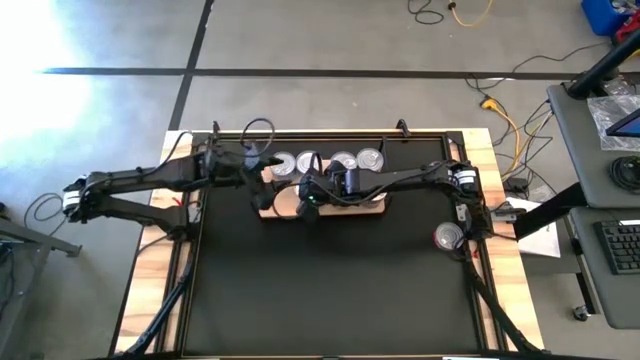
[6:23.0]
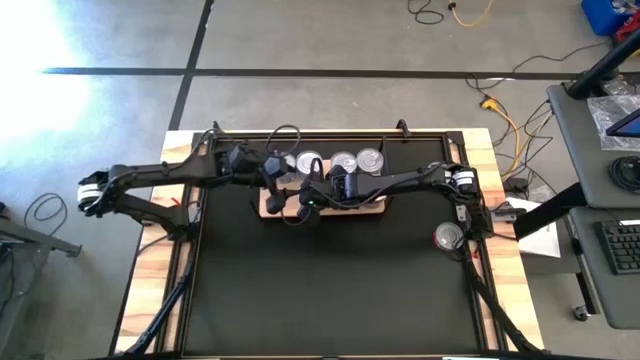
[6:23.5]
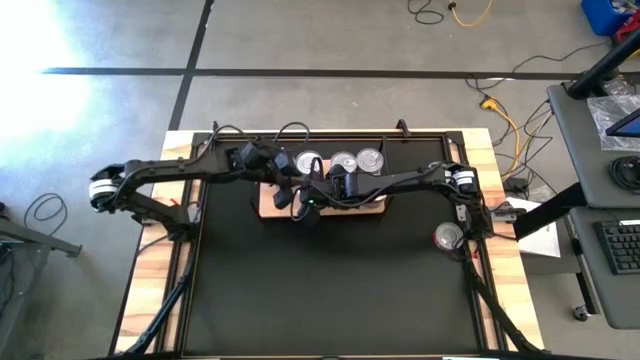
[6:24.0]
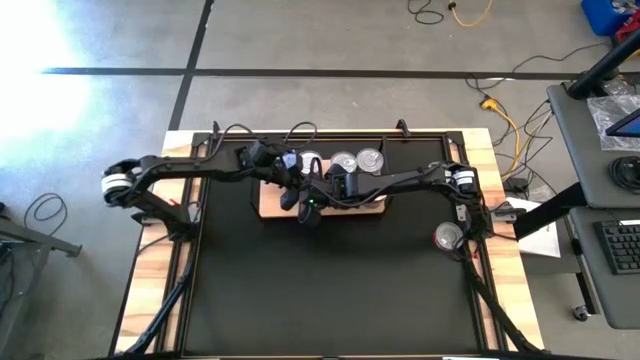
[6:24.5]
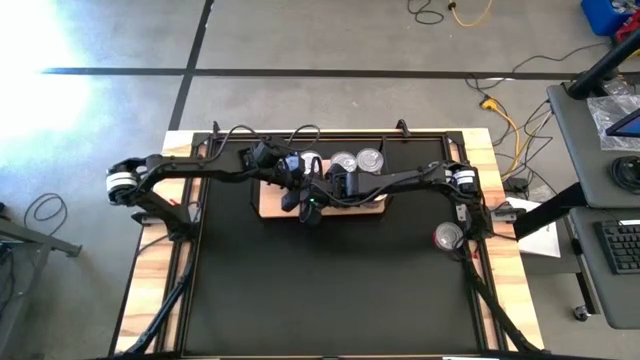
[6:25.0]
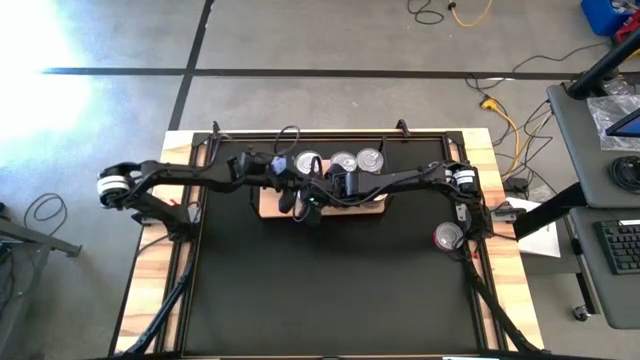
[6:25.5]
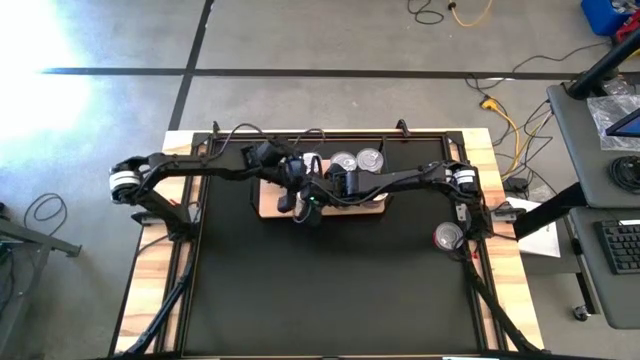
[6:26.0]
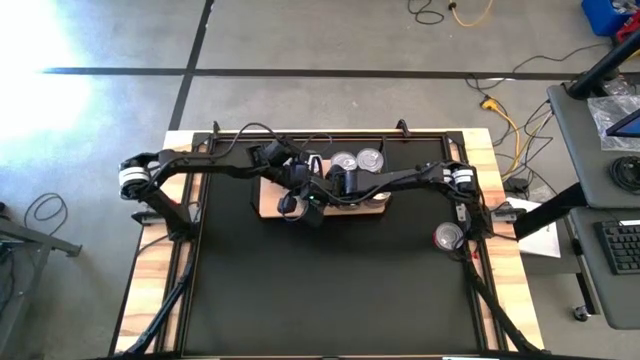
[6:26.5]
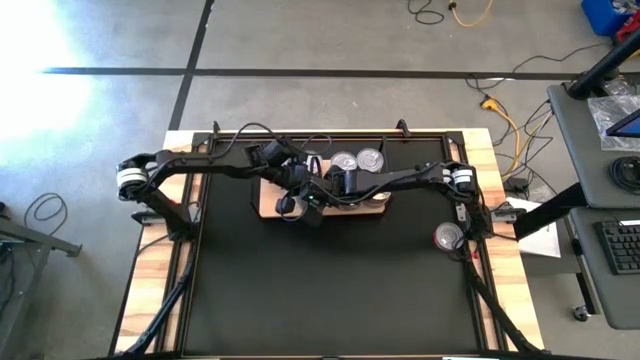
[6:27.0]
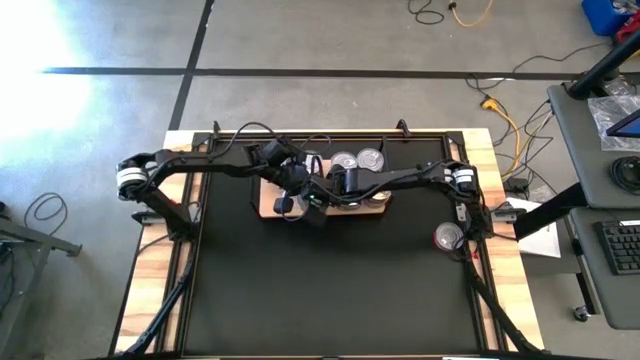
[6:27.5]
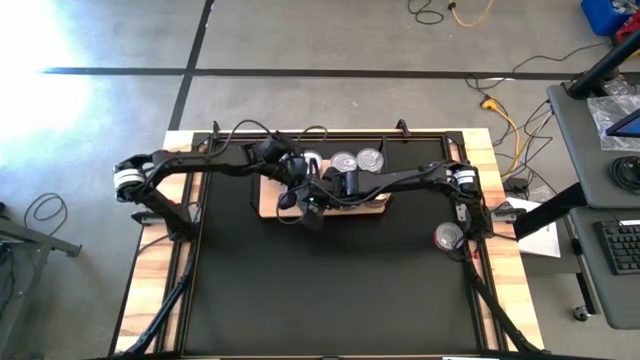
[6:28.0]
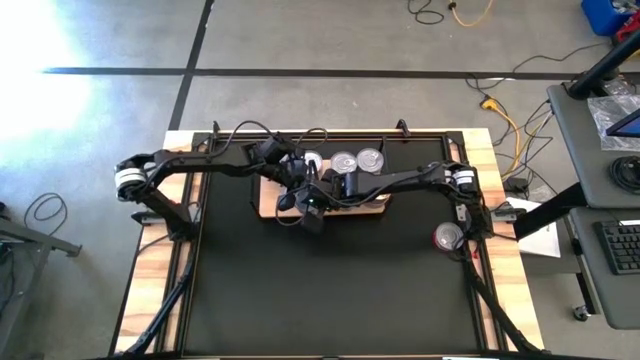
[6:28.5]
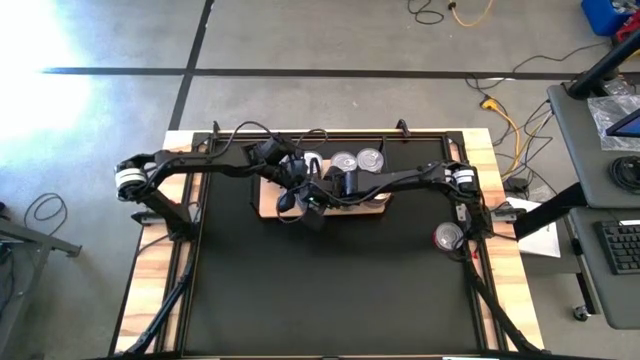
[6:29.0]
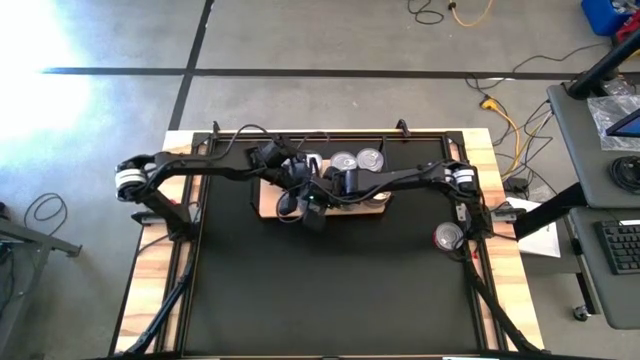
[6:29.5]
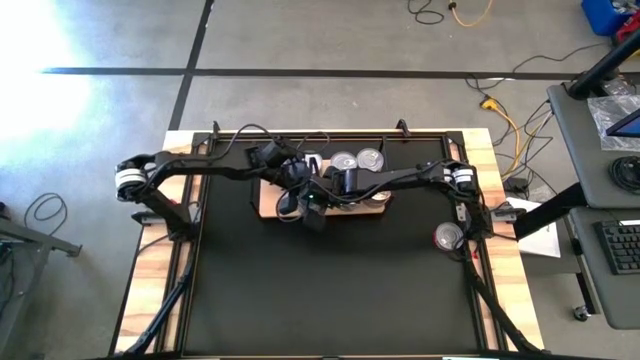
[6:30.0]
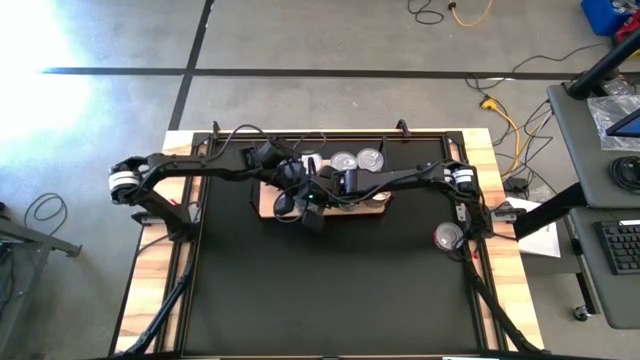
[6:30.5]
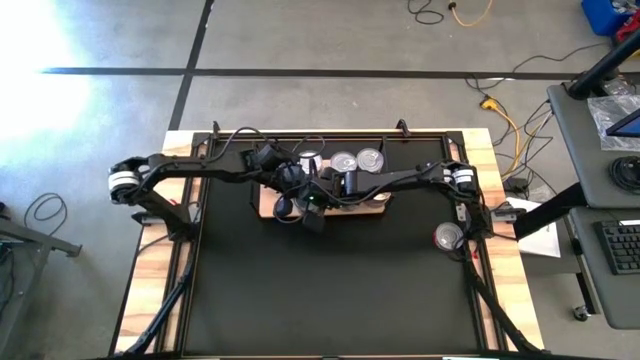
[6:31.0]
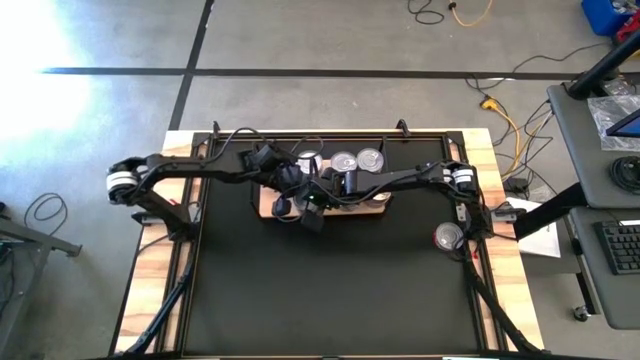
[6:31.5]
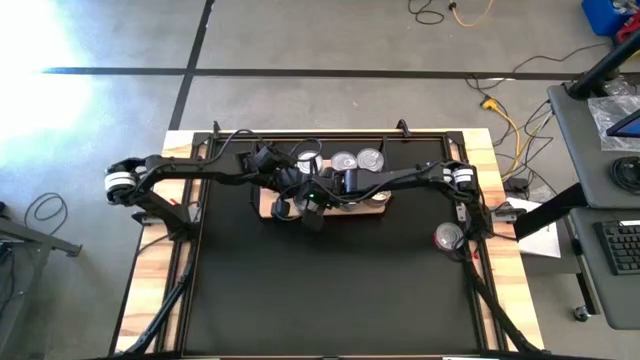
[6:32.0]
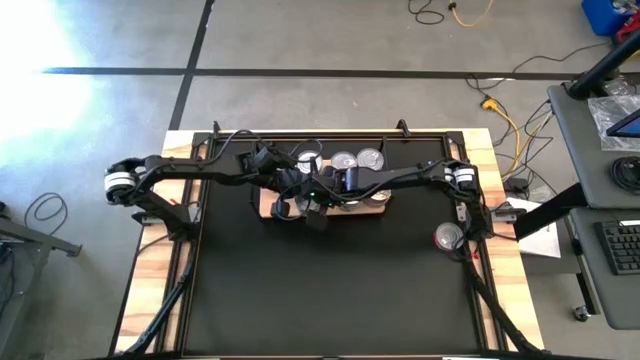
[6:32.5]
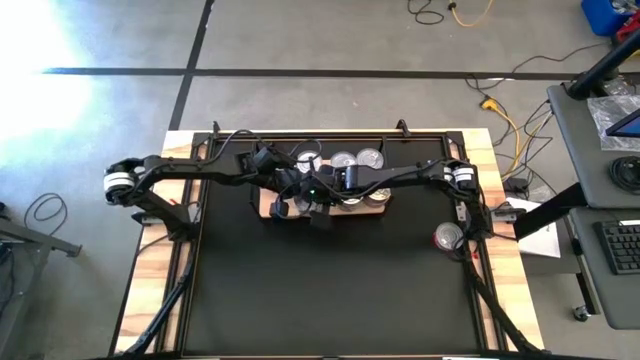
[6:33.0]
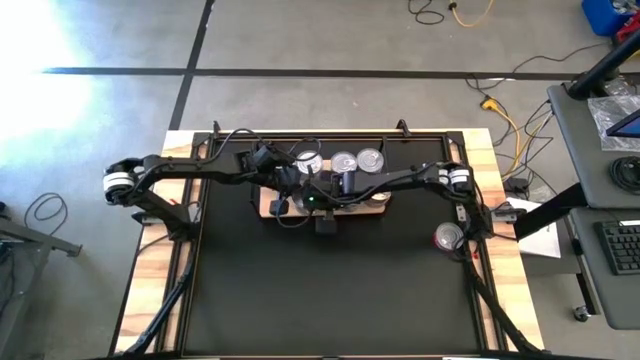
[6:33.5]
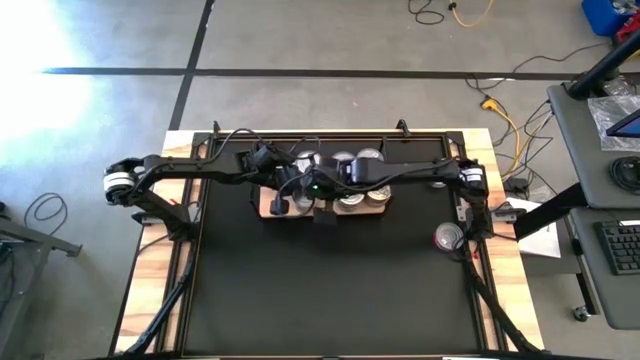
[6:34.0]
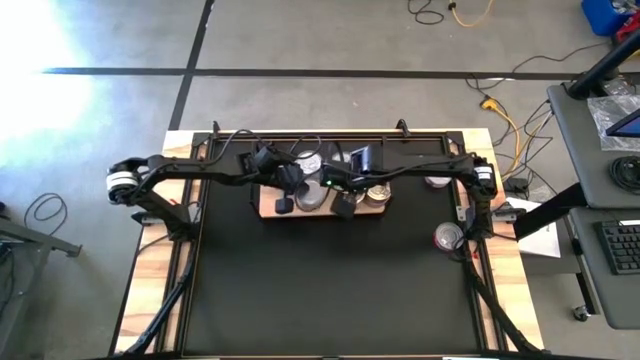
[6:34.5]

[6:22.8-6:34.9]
Task: Stack canned seafood by type on shelf
Stack the green and white tuna can on the green and white tuna can

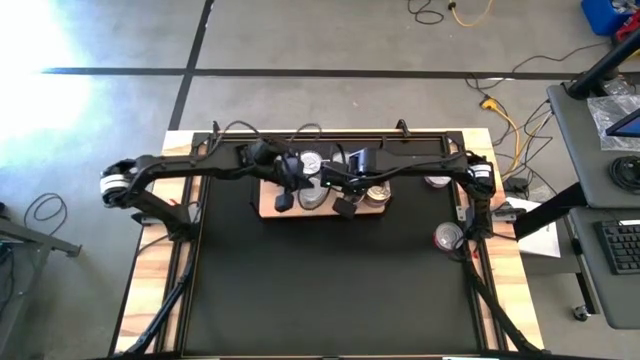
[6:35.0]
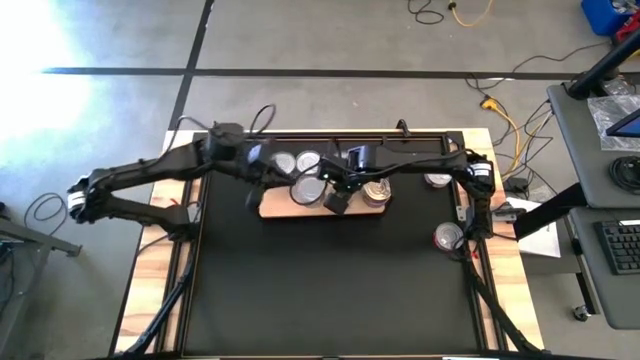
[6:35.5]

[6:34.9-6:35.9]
Adjust the left blue and orange tuna can stack

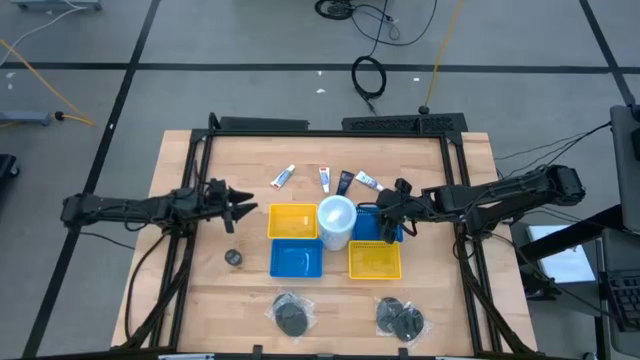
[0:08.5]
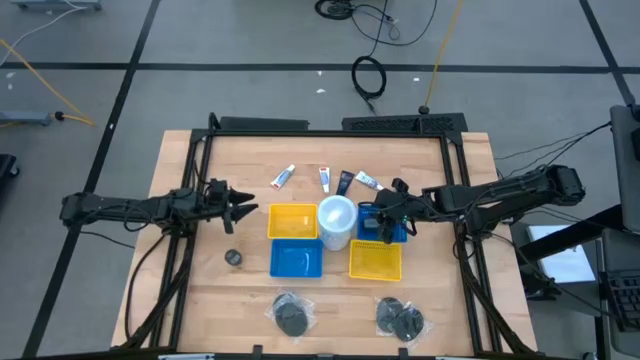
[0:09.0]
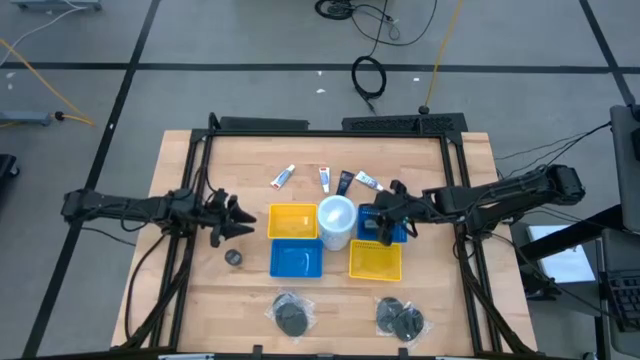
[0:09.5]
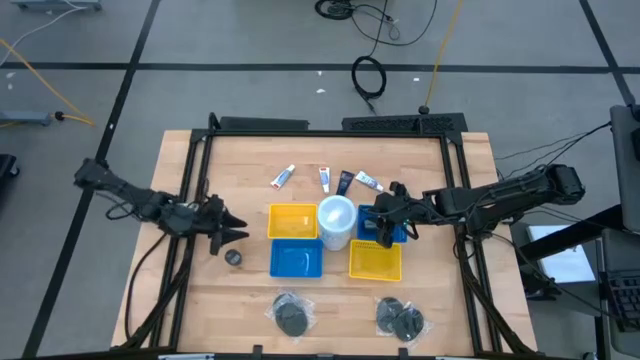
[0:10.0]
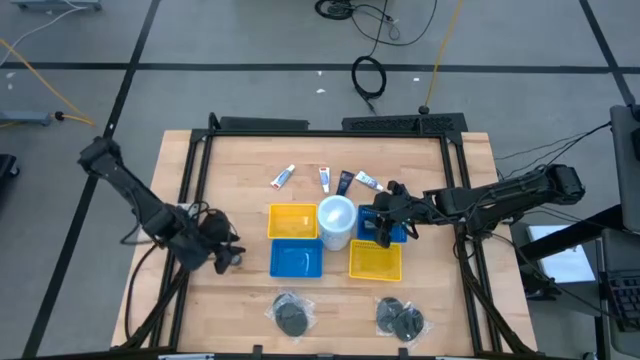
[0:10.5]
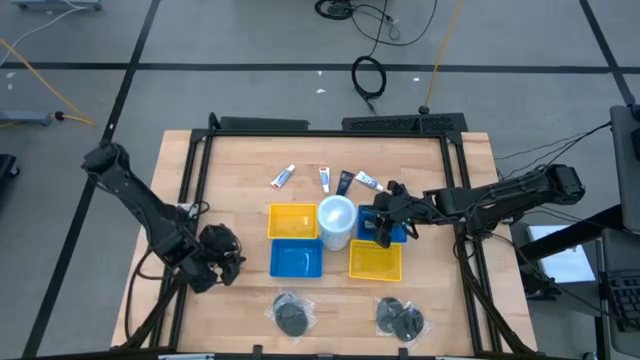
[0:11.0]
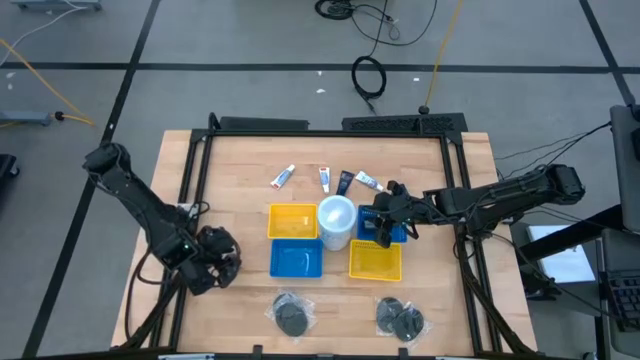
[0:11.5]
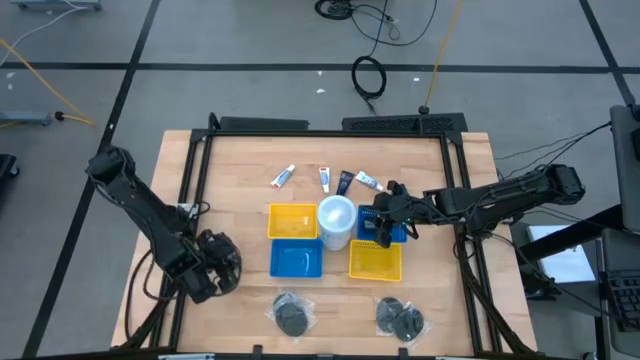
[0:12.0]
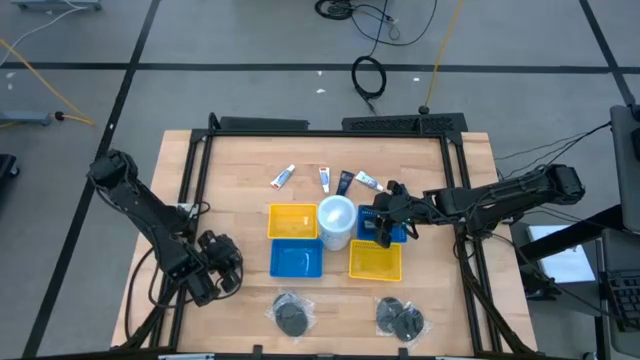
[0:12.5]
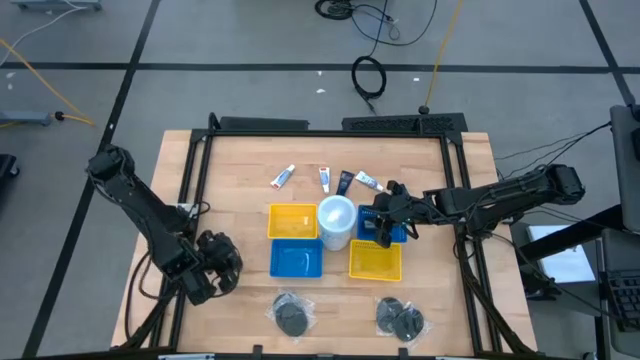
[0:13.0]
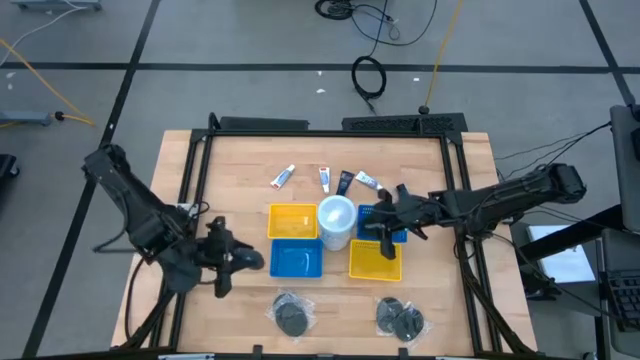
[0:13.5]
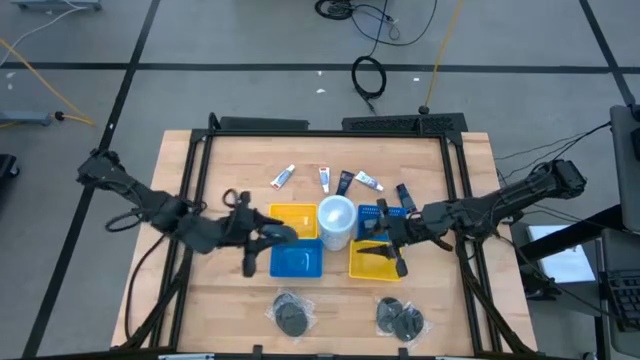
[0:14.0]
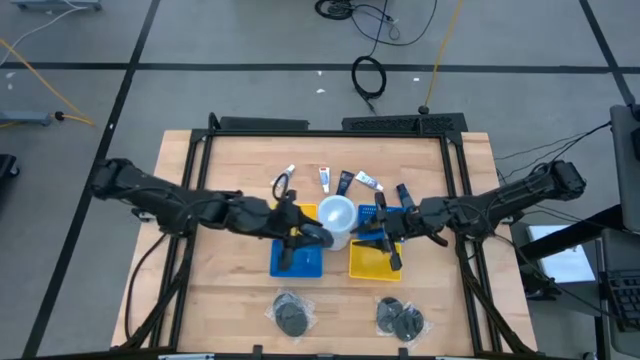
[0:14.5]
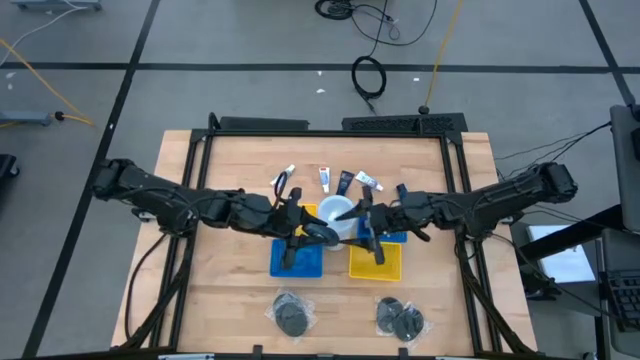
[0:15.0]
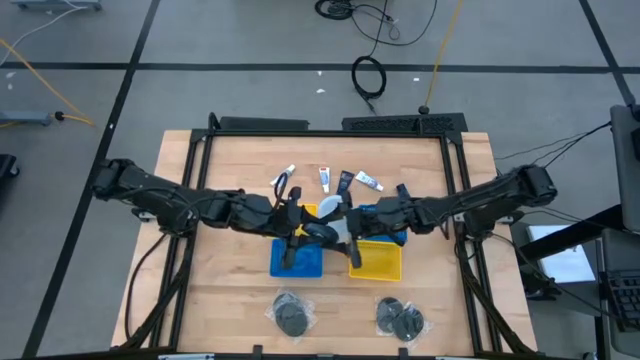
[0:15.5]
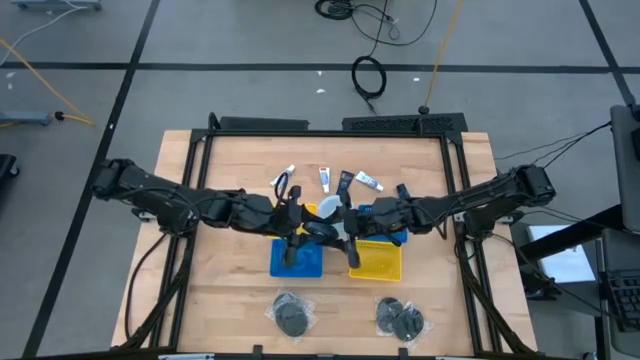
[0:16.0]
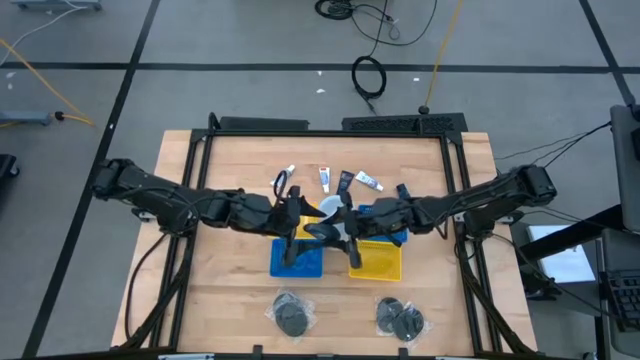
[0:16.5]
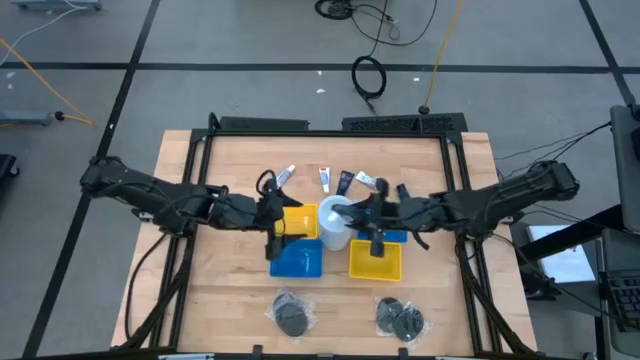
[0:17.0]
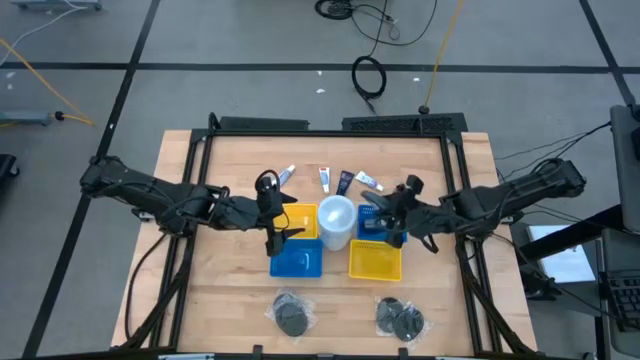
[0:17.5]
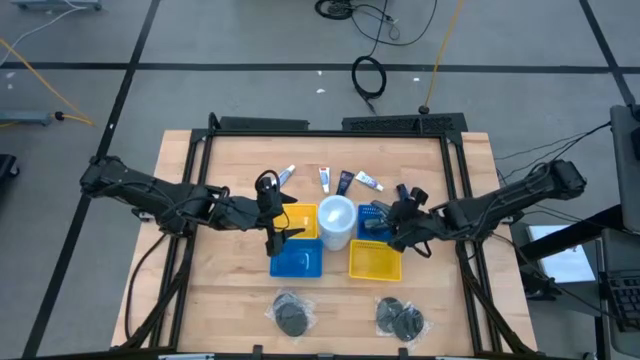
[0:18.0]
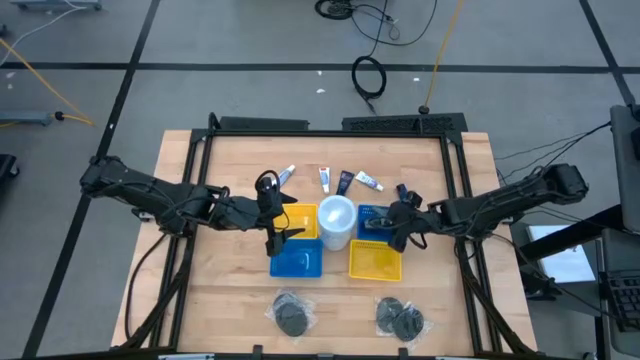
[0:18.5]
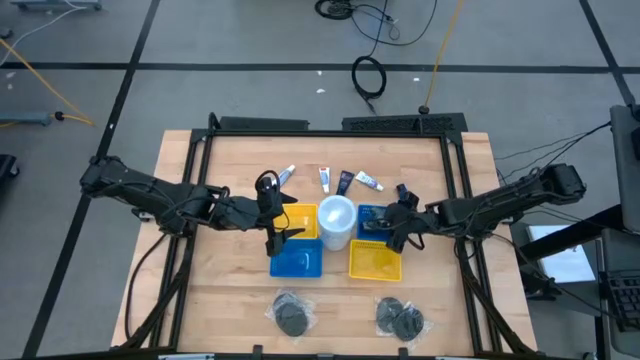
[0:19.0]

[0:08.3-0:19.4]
Task: Pick & Place Travel size toiletries
Put the black deodorant into the top blue bin
